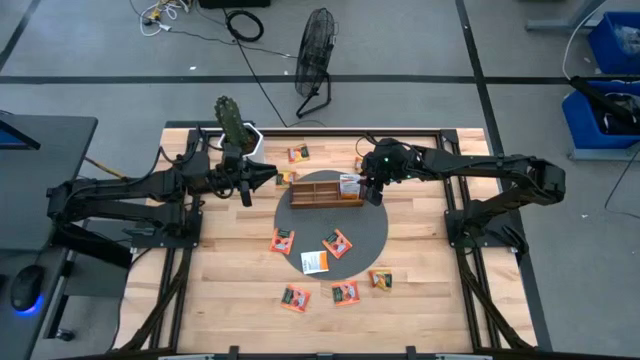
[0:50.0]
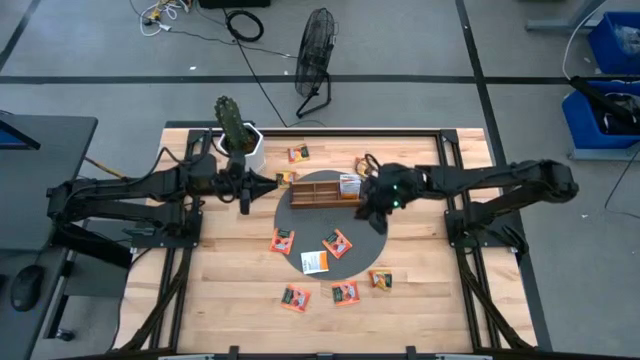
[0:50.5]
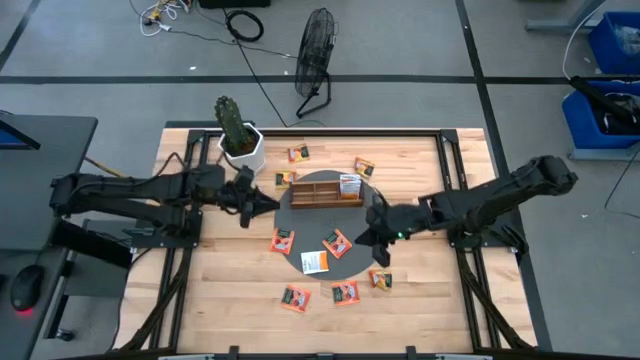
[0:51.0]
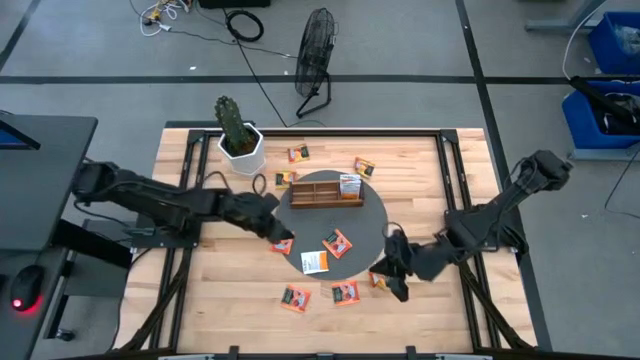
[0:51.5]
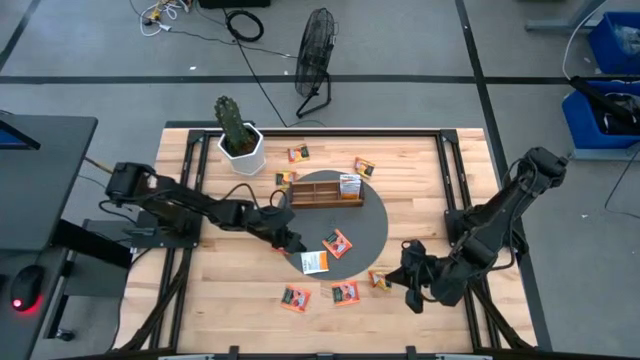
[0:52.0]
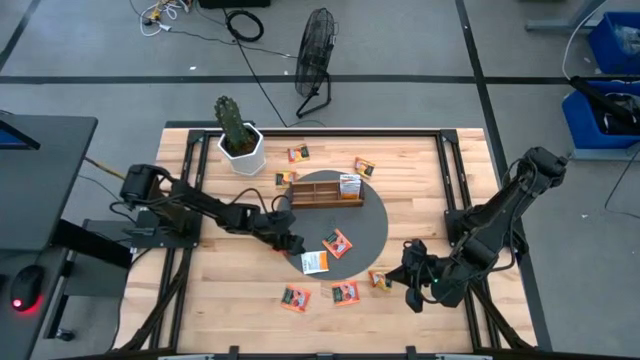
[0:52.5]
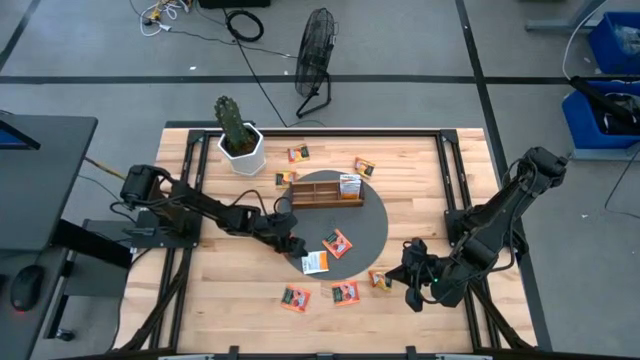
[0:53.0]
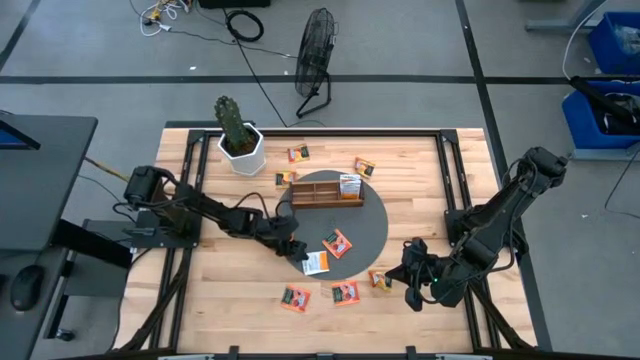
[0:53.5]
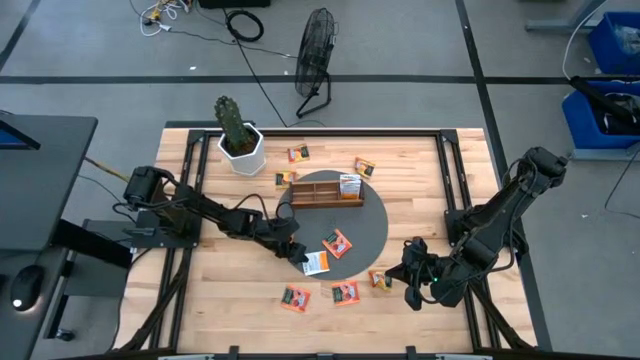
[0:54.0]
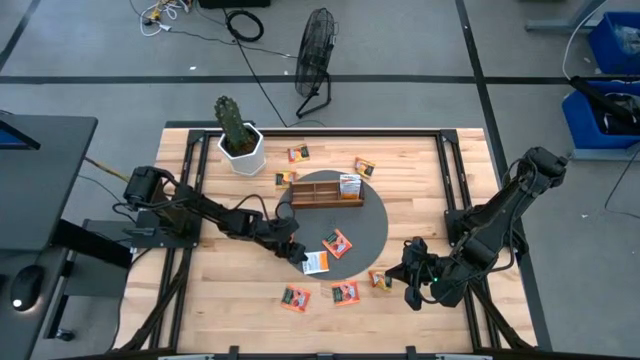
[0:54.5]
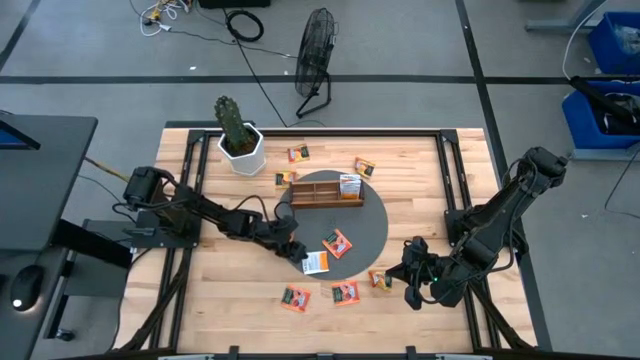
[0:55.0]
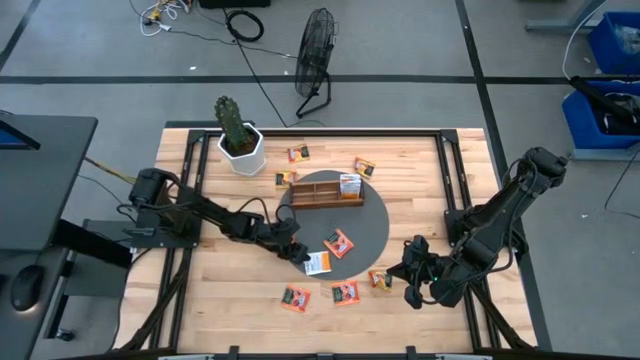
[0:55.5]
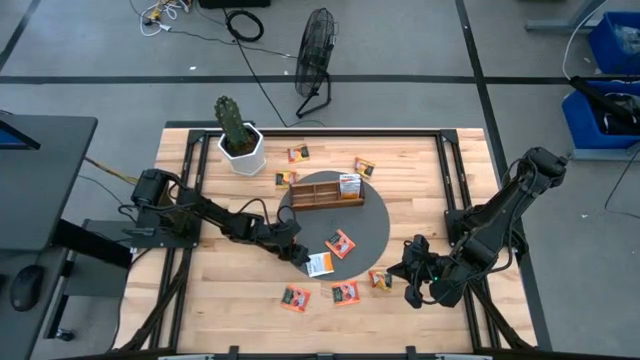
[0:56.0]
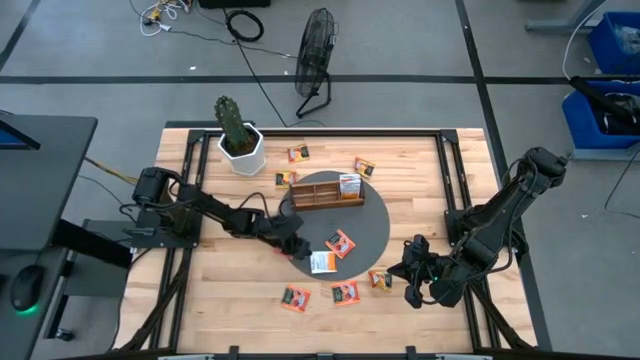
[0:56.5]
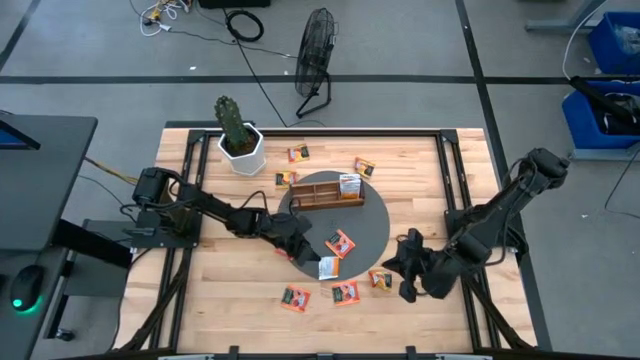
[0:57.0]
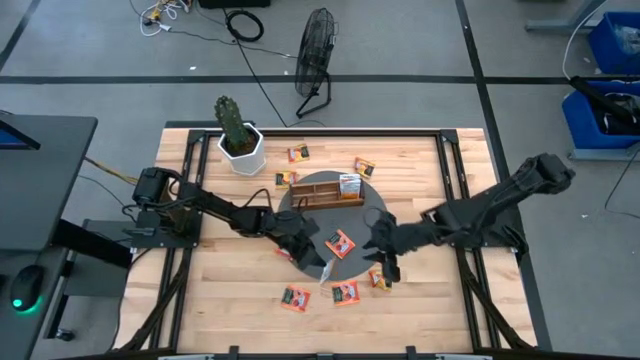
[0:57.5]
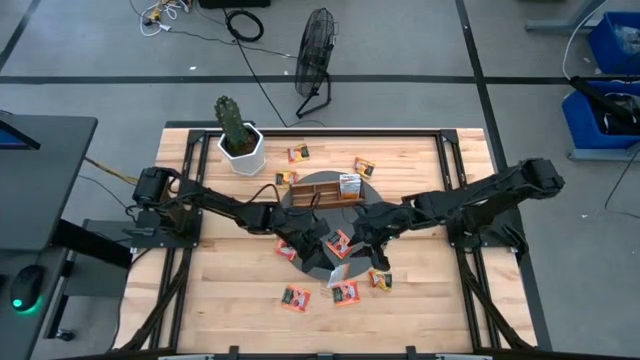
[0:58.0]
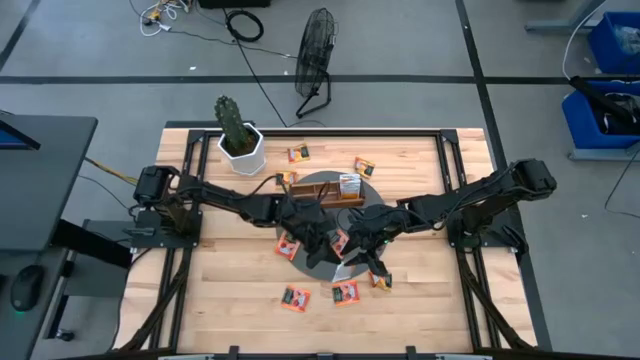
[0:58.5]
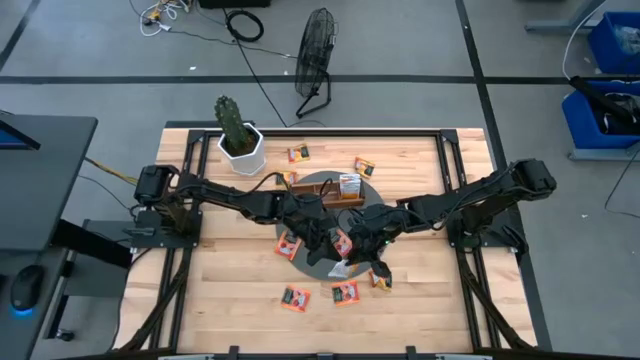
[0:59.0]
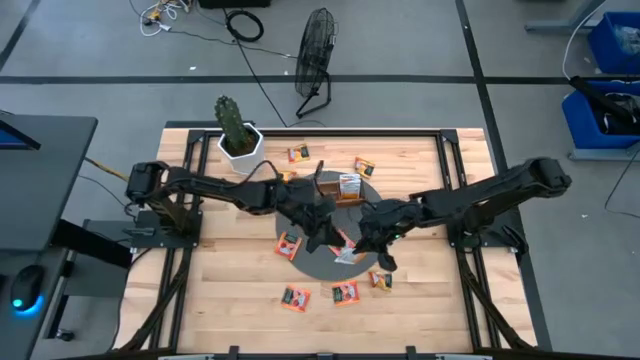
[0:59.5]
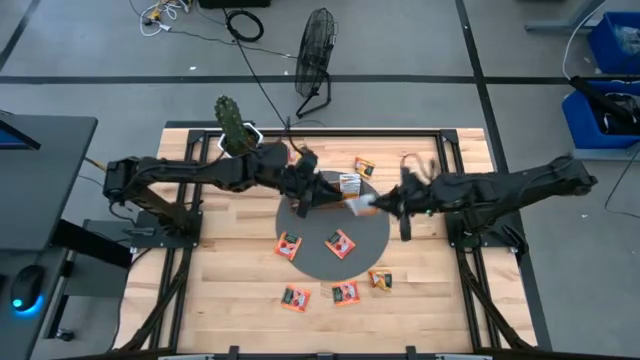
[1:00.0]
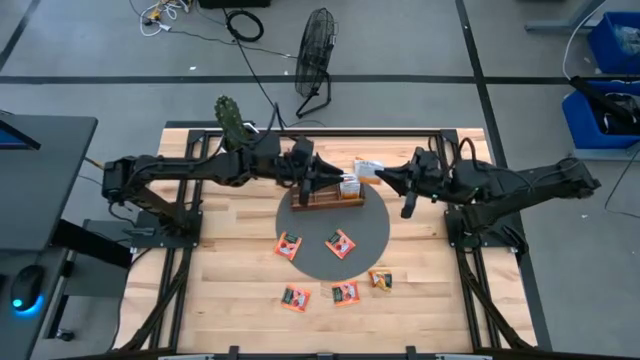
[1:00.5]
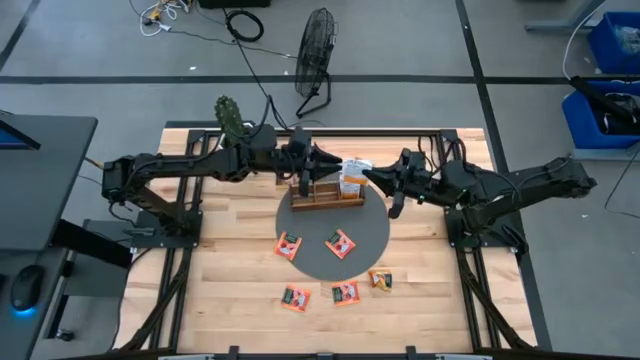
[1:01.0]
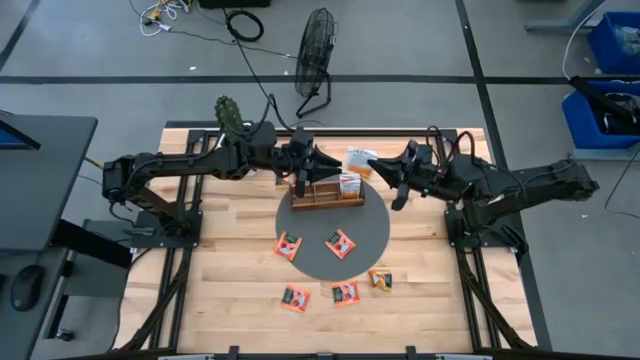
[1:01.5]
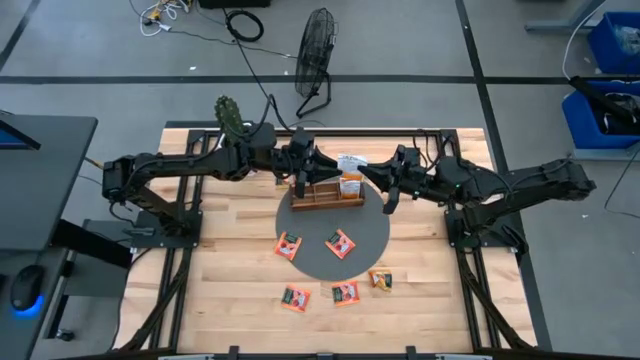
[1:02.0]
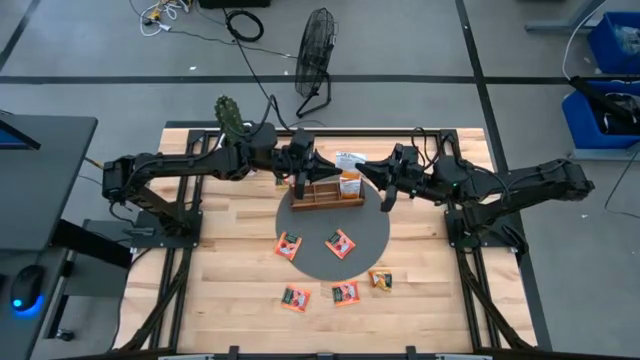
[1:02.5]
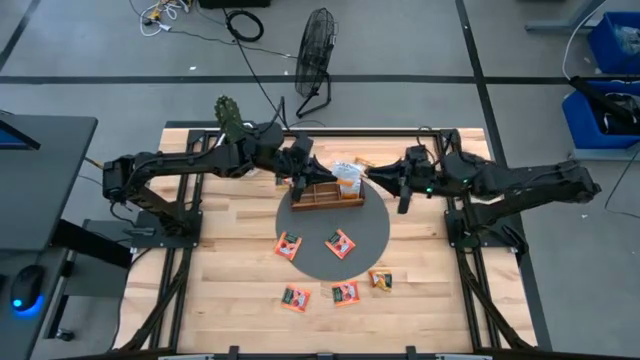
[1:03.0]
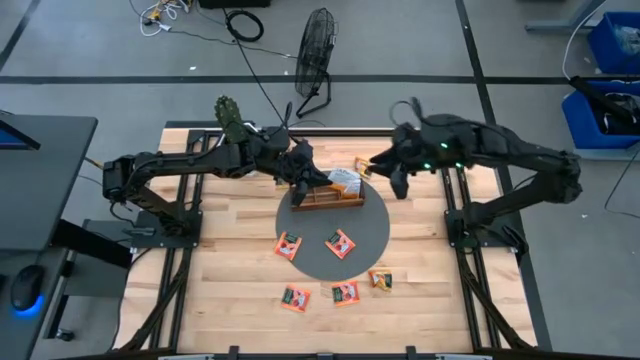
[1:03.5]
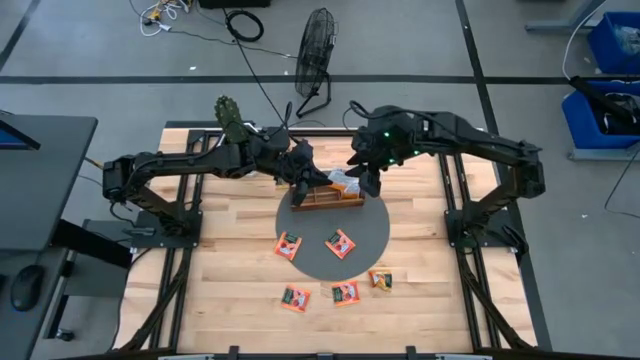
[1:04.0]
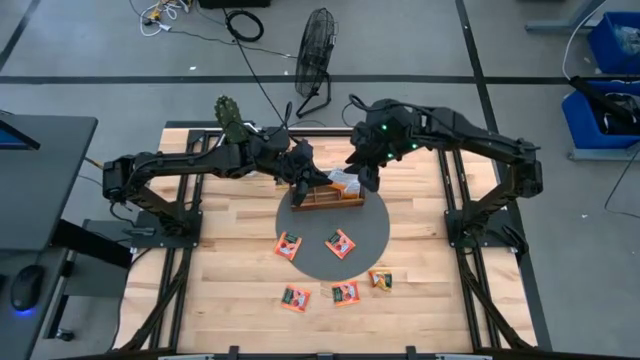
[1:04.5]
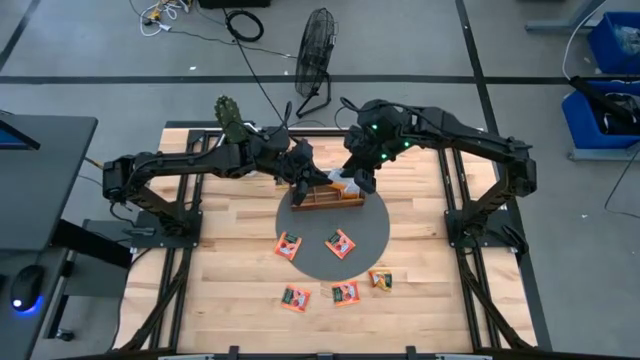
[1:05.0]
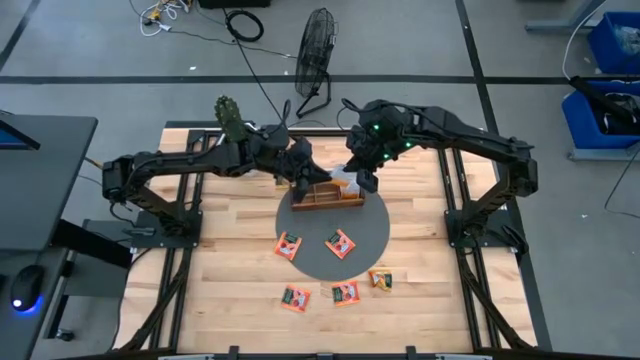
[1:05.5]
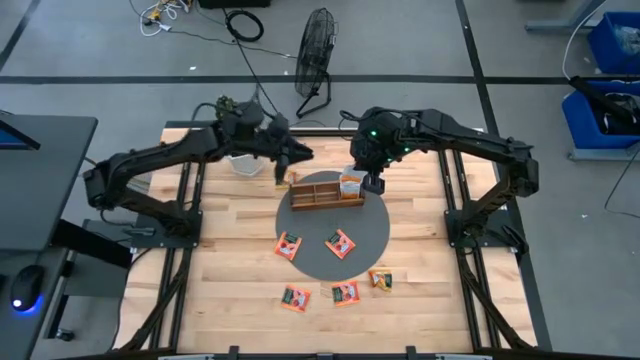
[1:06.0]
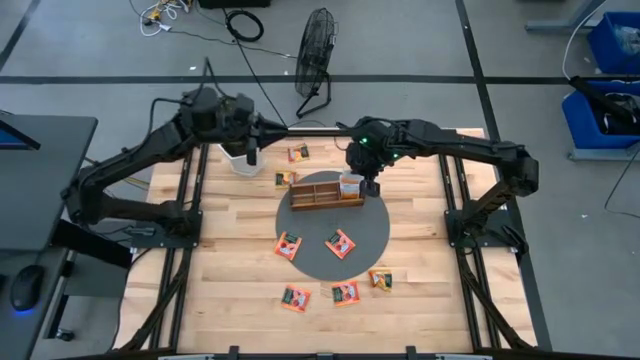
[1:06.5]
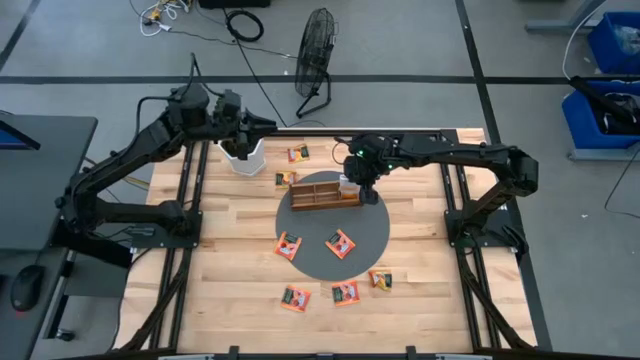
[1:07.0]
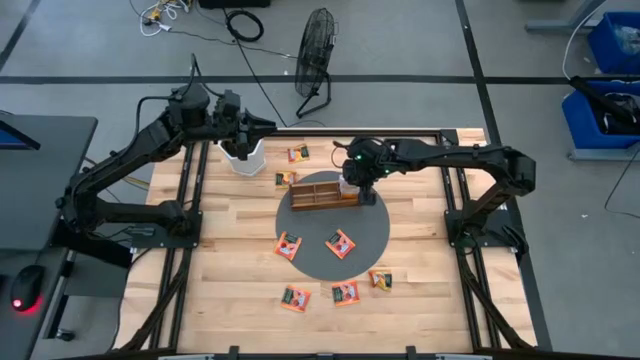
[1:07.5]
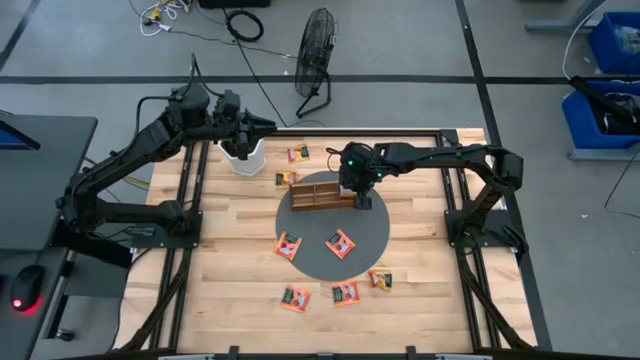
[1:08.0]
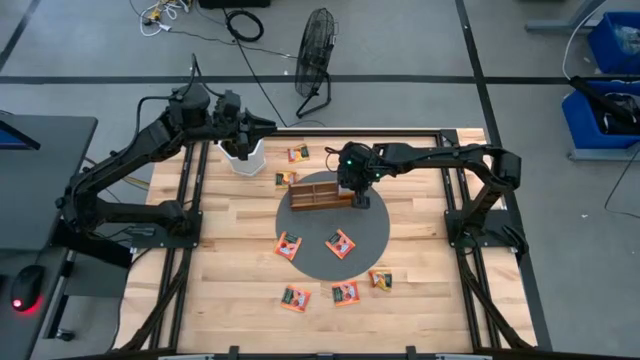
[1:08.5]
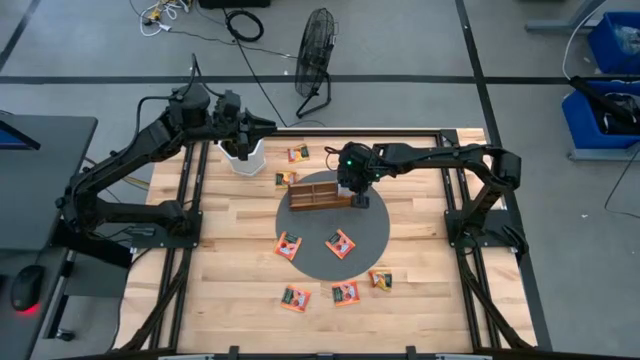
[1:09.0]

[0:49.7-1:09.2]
Task: Pick & Place Tea
Put the white tea bag into the right section of the wooden organizer

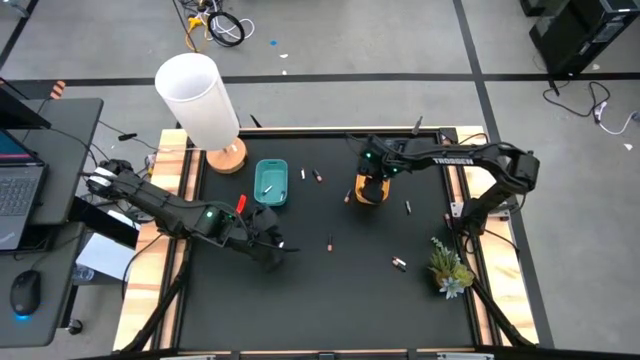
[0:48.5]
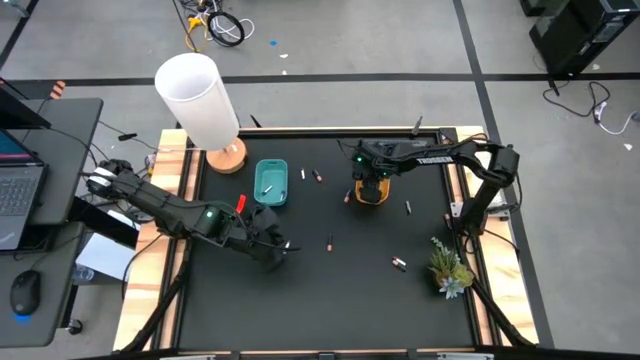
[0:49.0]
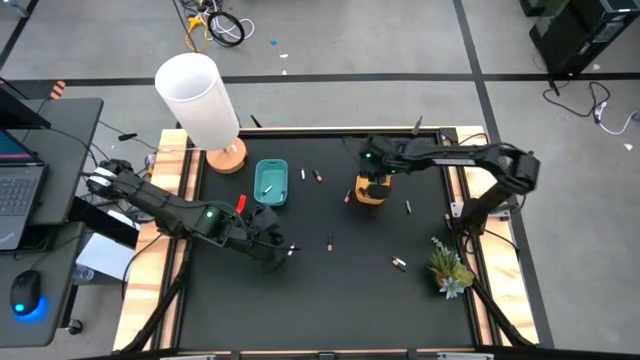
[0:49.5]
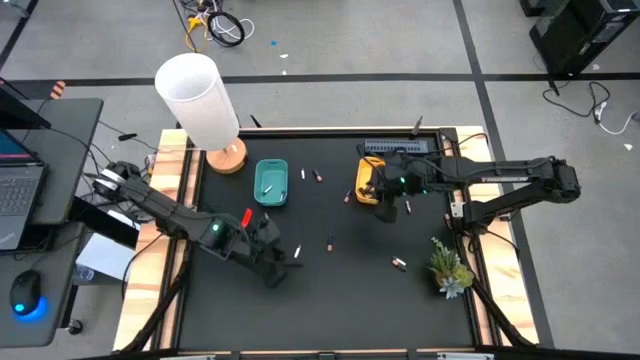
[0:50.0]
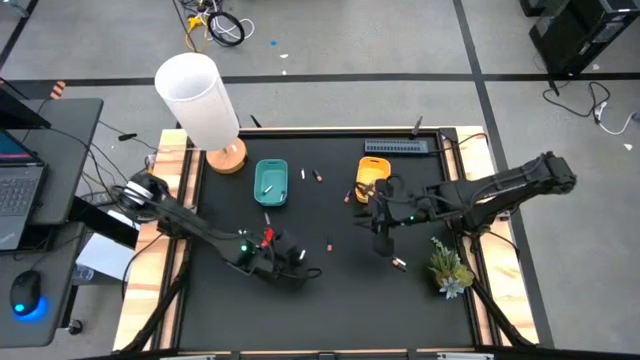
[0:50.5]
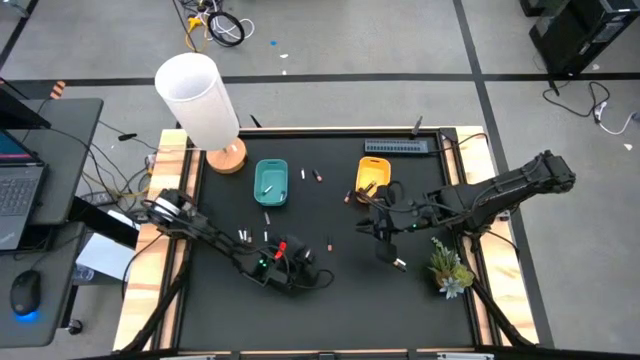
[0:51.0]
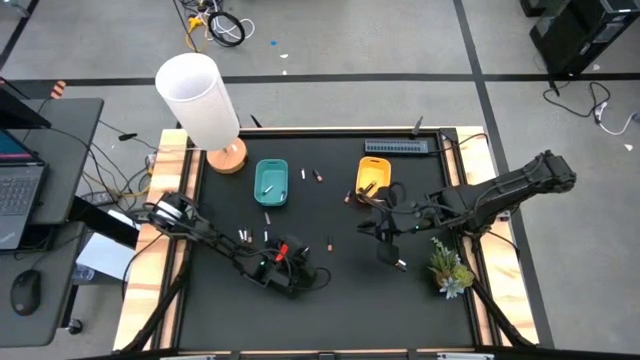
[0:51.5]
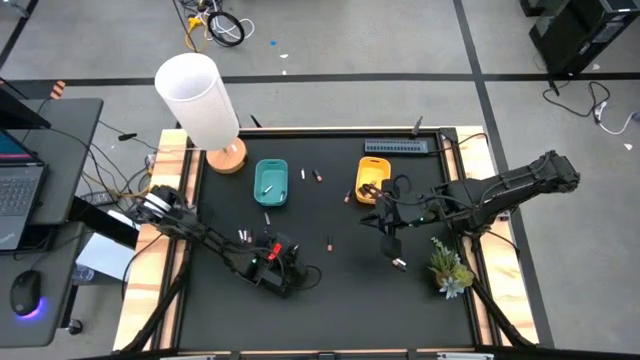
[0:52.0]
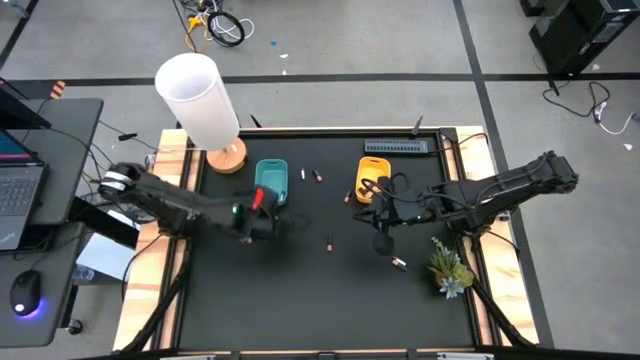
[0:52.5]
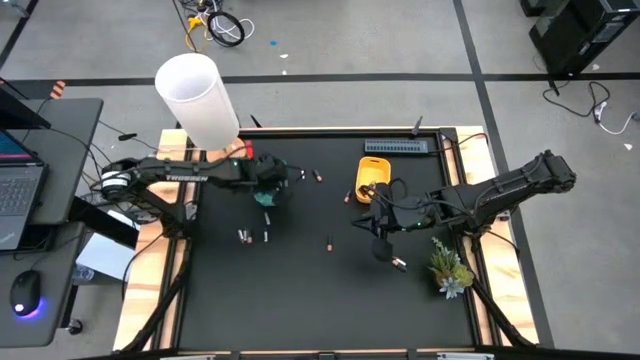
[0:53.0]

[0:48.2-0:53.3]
Task: Sort batteries
Put the silver battery into the blue bin
